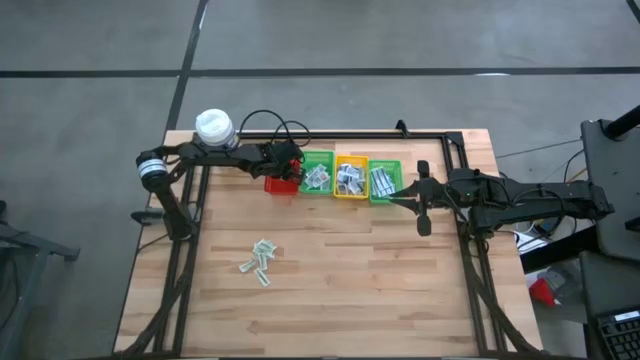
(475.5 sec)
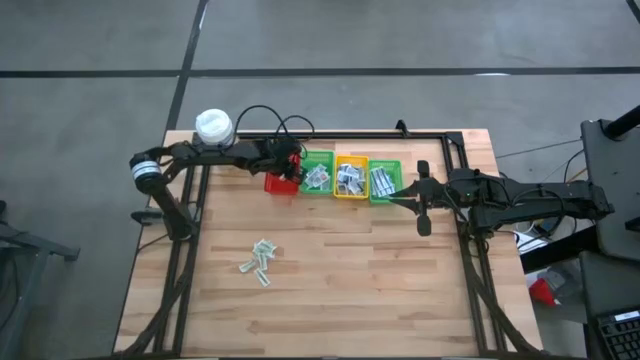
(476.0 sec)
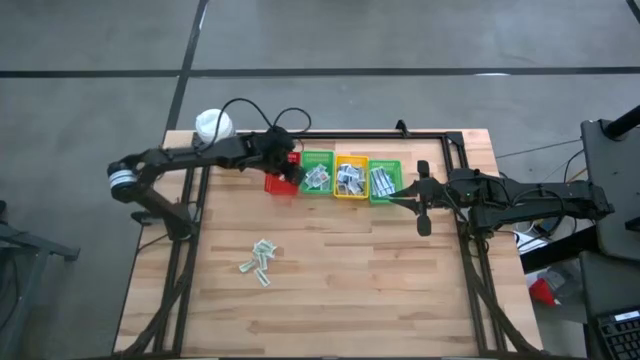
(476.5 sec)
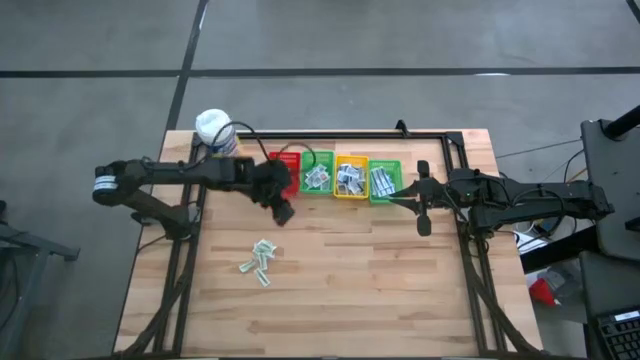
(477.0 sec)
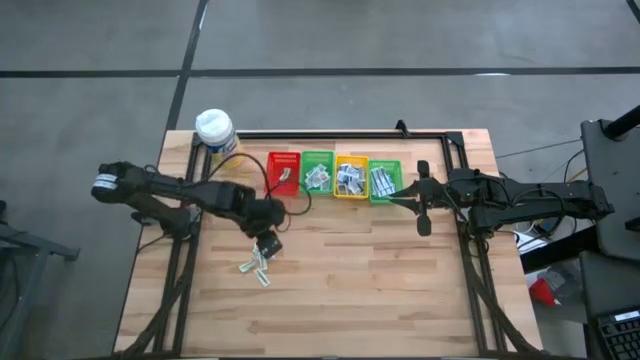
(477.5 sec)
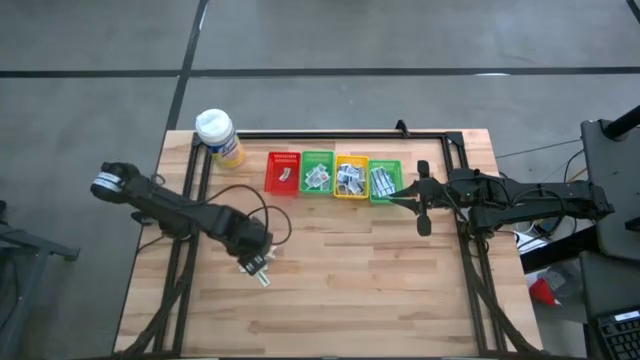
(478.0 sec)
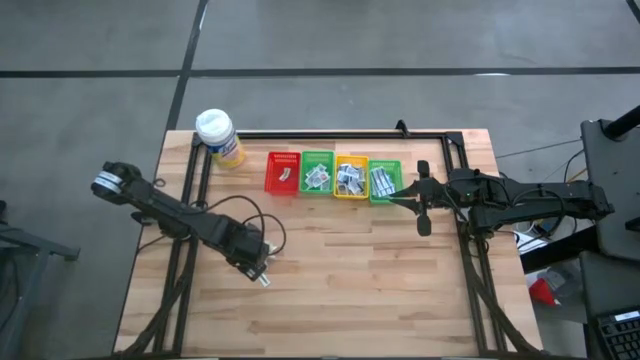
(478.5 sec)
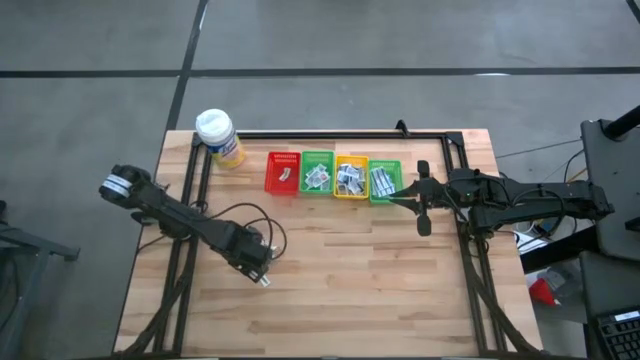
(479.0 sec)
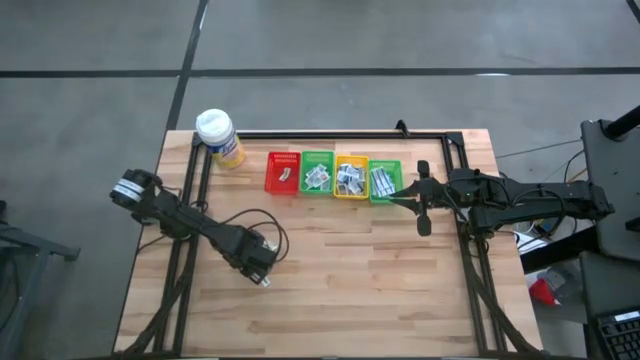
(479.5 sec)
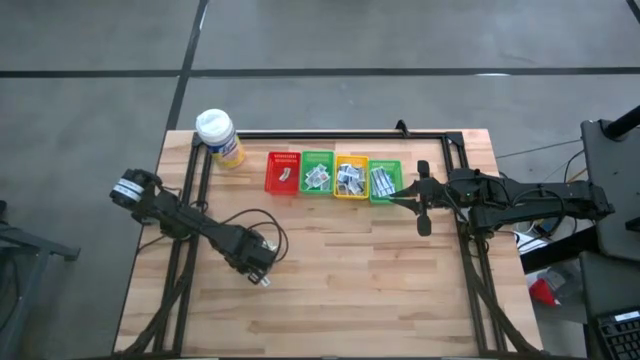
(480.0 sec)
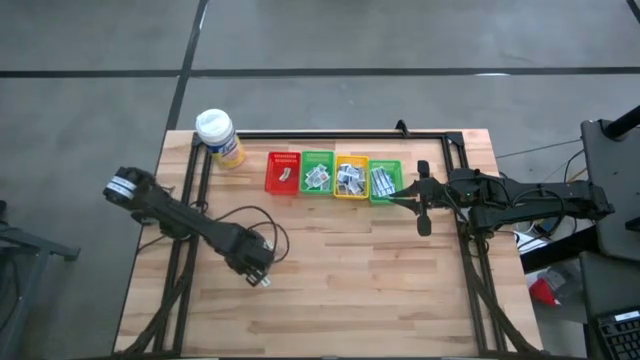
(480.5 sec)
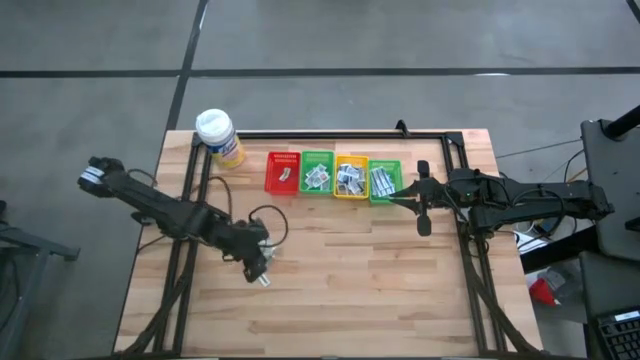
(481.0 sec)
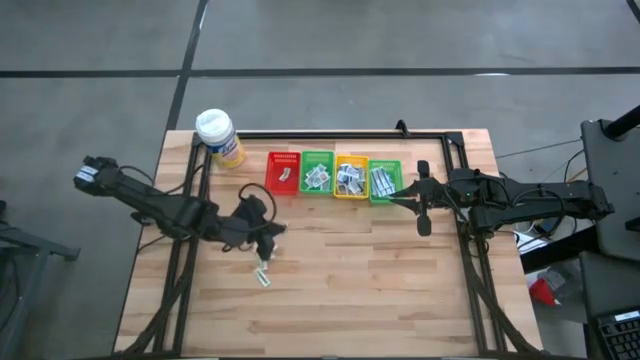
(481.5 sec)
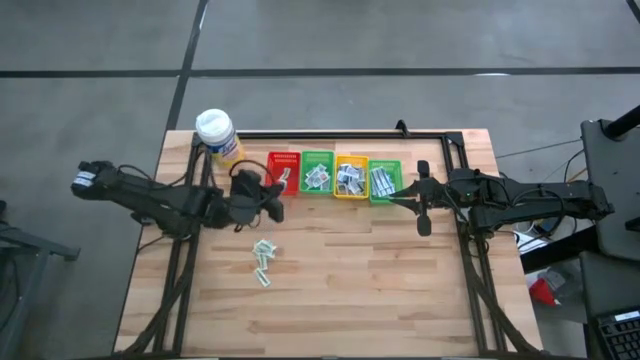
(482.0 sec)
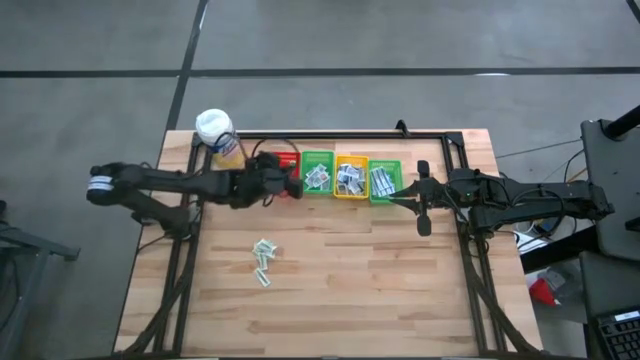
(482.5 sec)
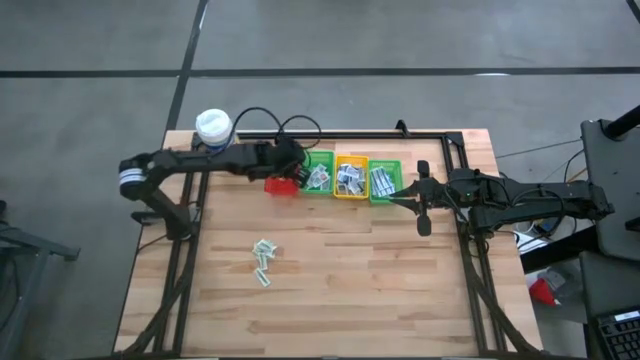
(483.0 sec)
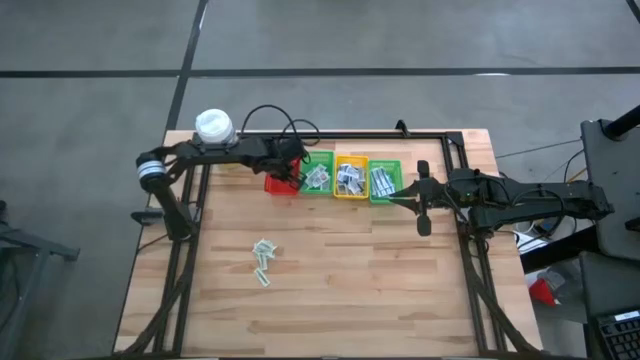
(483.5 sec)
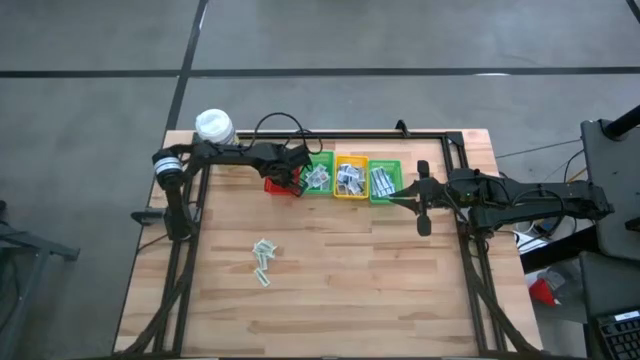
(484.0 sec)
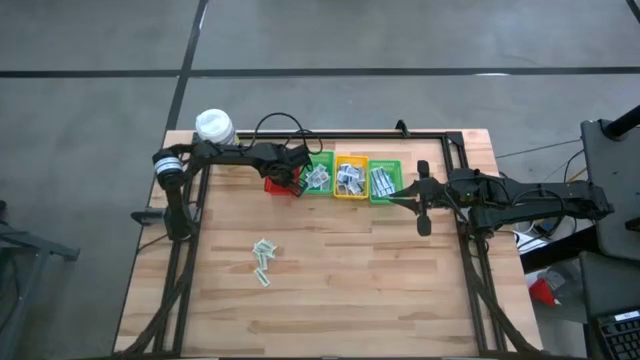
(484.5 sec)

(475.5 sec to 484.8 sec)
Task: Pick & Place First Aid Supplies
Put the green bandage into the red bin

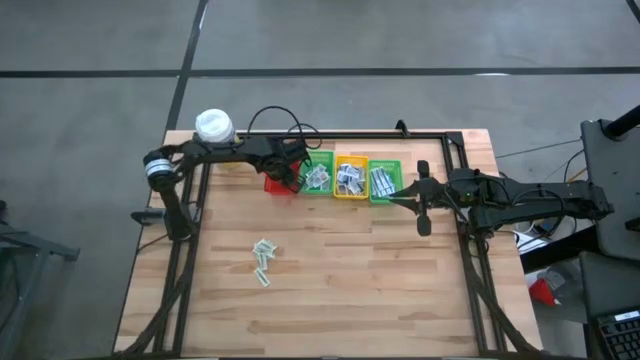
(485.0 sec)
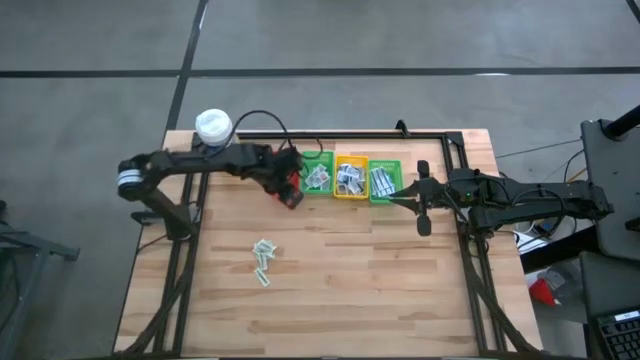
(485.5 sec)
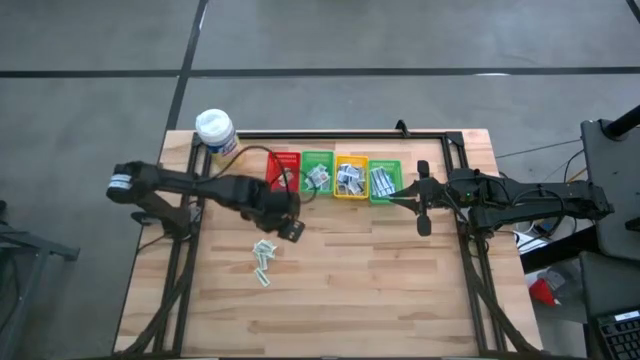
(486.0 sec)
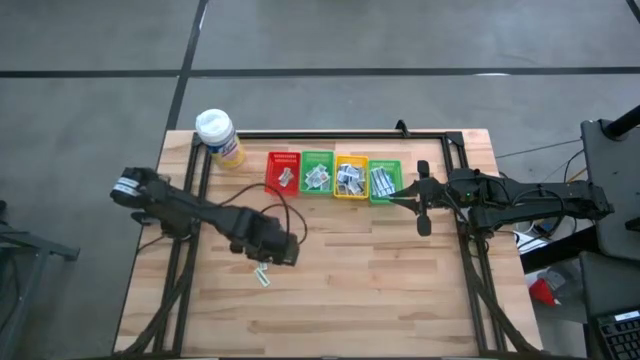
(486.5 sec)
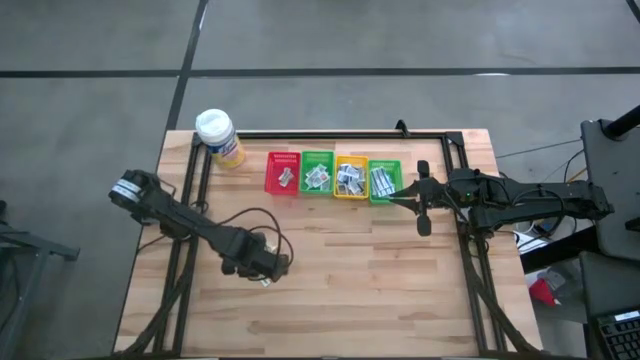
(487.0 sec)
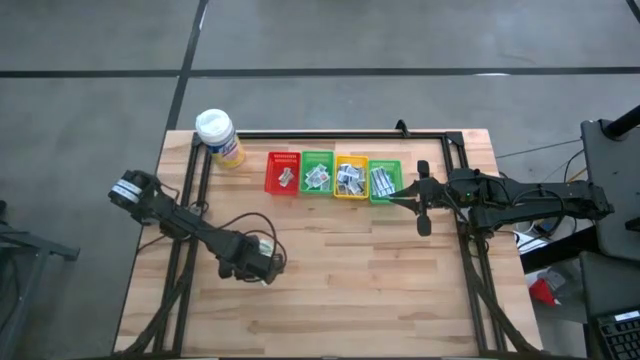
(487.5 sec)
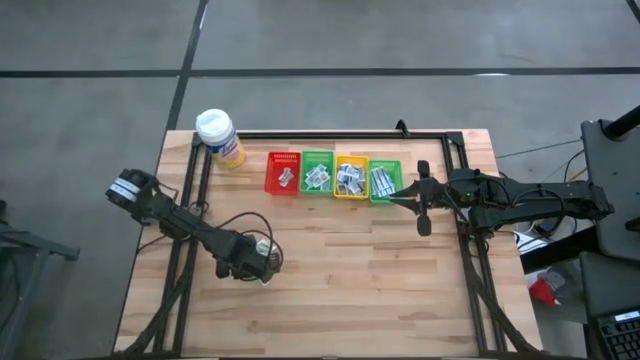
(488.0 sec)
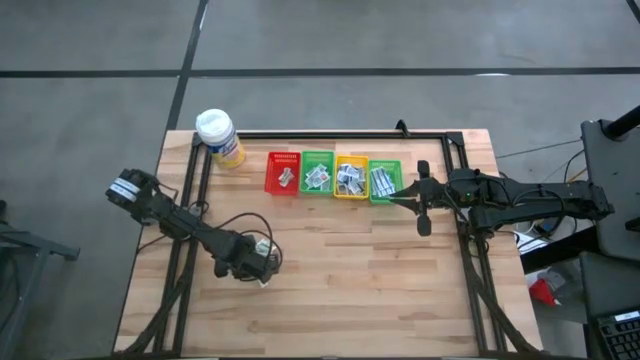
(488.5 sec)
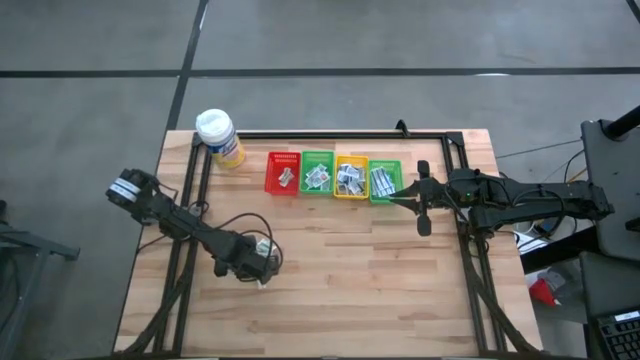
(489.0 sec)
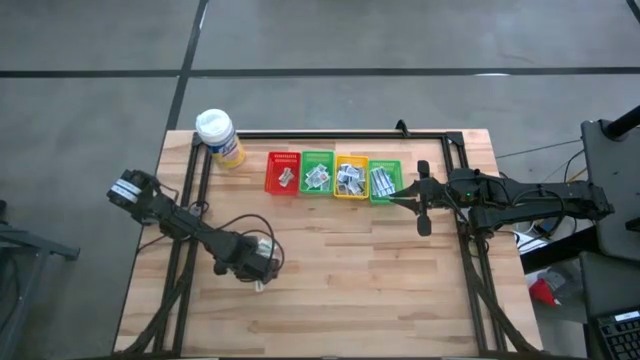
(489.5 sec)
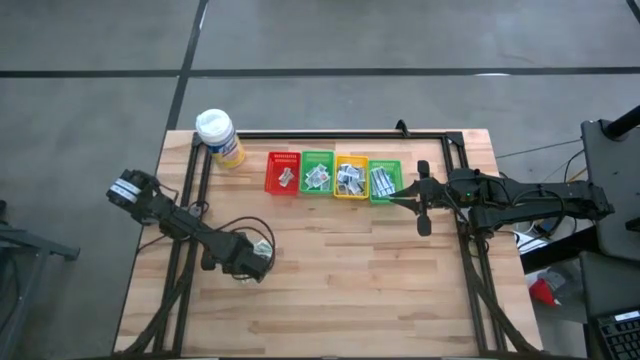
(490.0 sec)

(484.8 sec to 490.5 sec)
Put the green bandage into the red bin

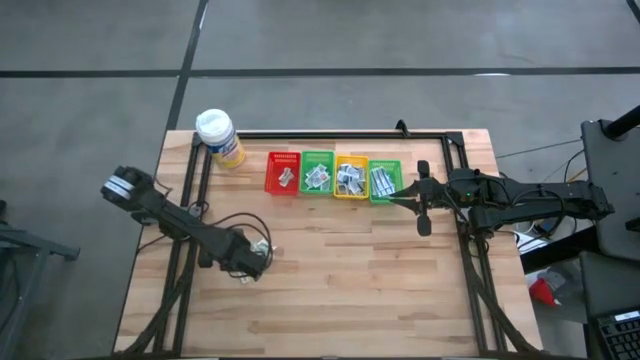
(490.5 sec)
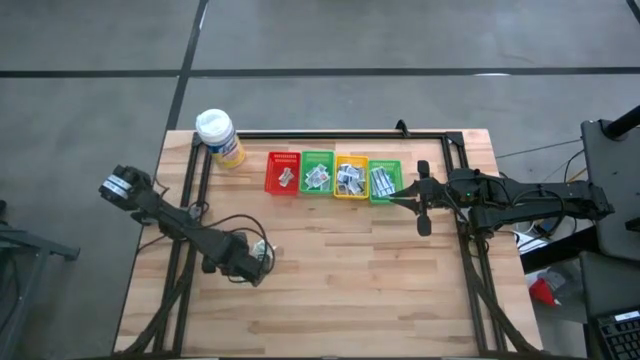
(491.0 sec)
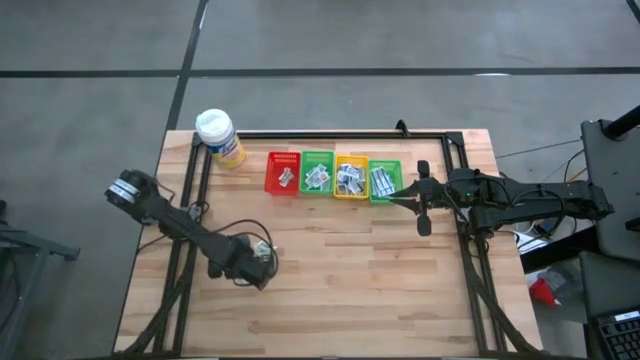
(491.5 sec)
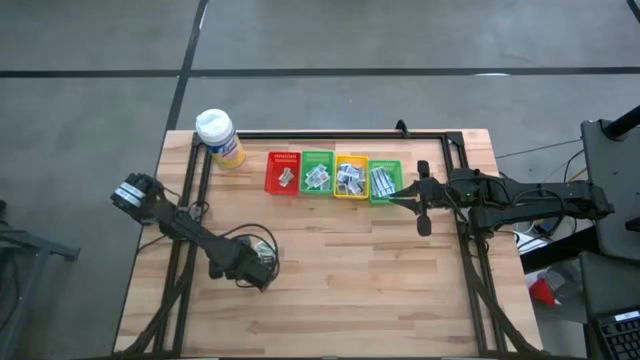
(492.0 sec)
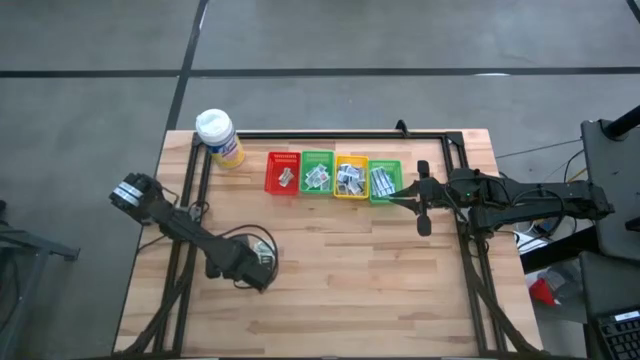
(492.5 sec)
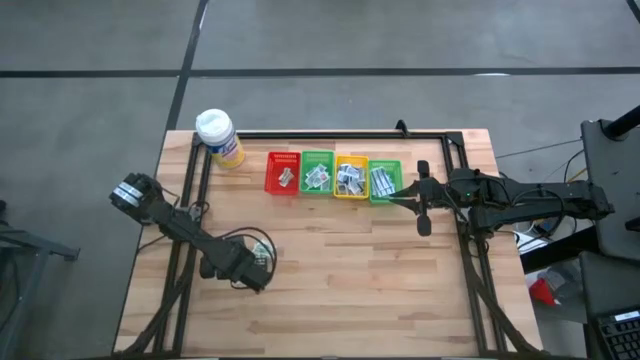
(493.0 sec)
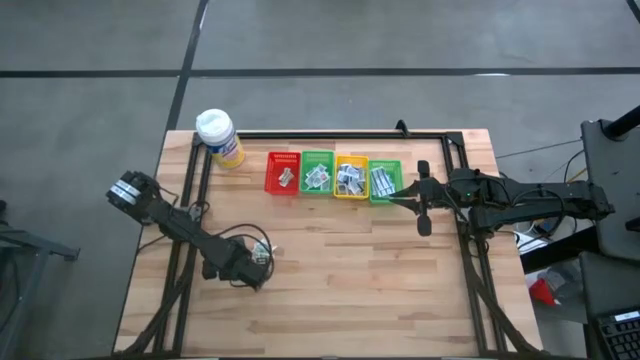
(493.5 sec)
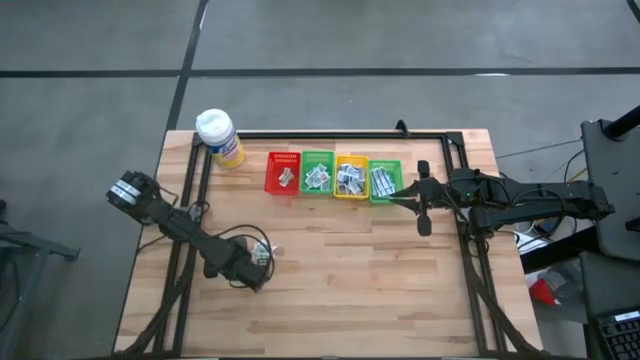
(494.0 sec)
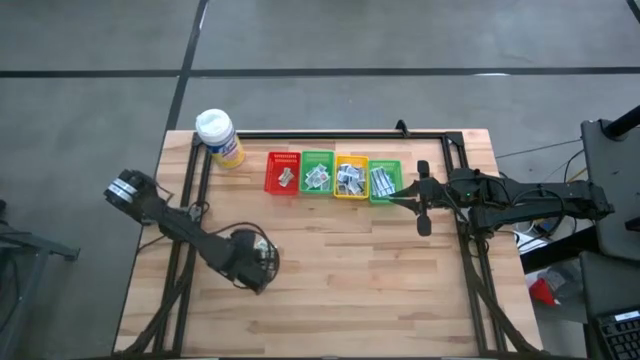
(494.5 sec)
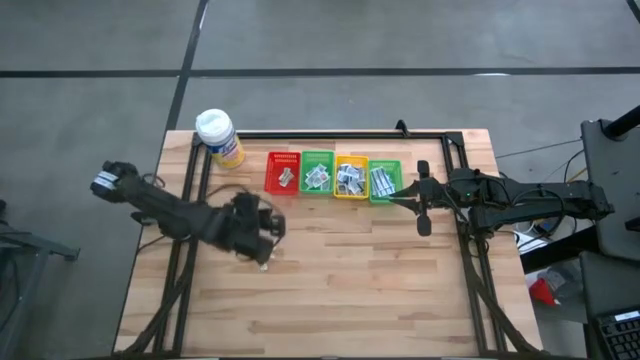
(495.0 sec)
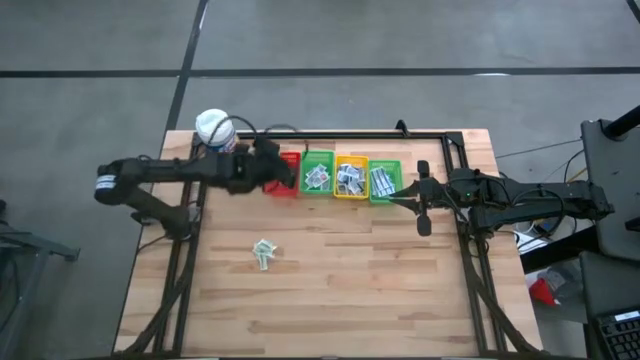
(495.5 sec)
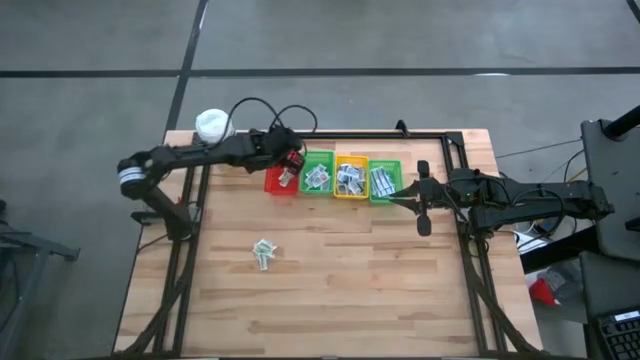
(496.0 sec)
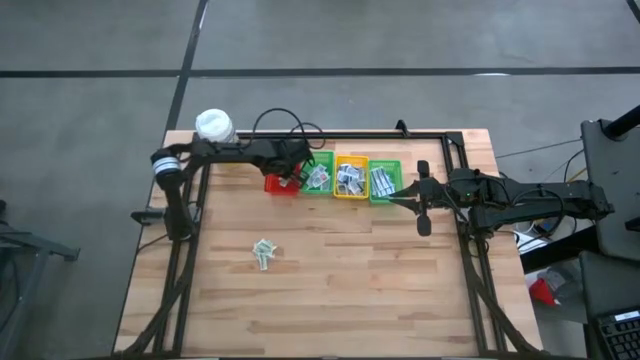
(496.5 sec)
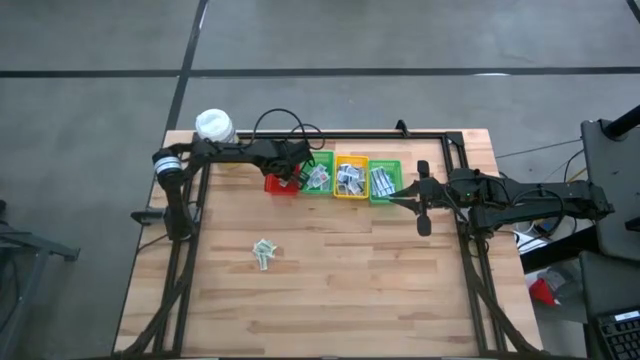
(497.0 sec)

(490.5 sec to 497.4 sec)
Put the green bandage into the red bin
